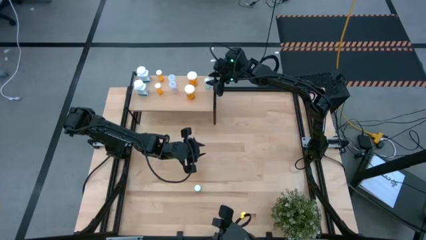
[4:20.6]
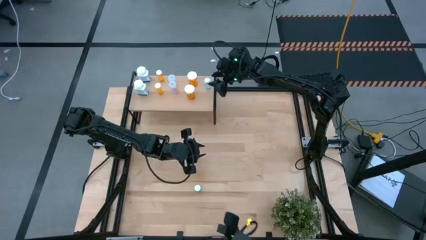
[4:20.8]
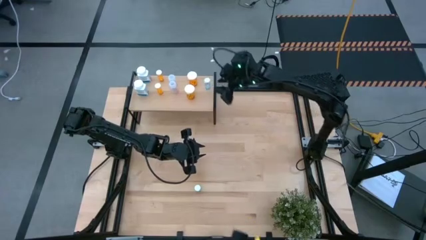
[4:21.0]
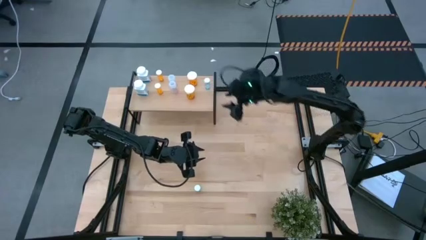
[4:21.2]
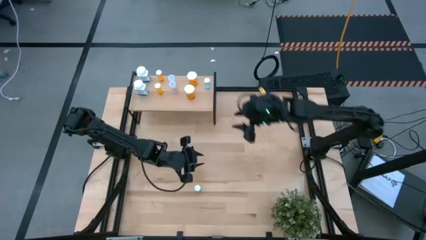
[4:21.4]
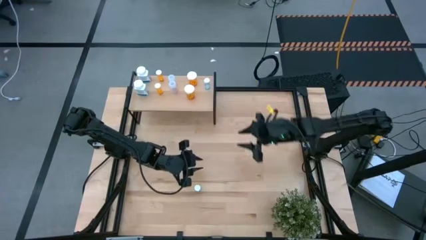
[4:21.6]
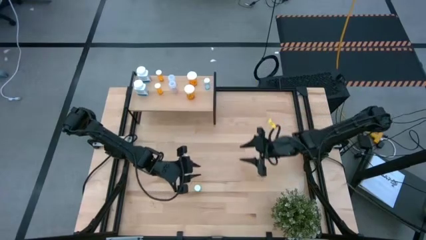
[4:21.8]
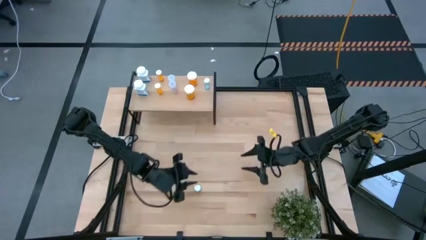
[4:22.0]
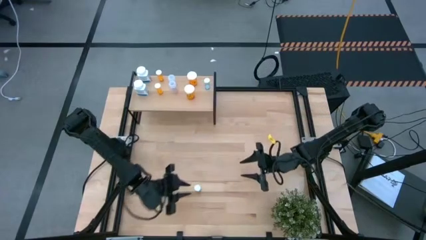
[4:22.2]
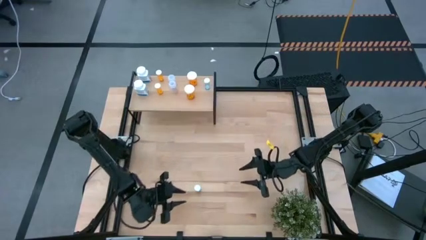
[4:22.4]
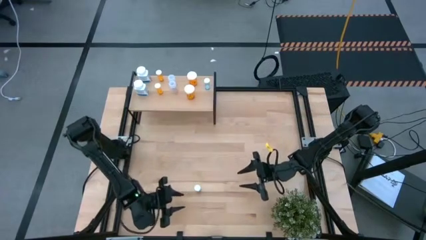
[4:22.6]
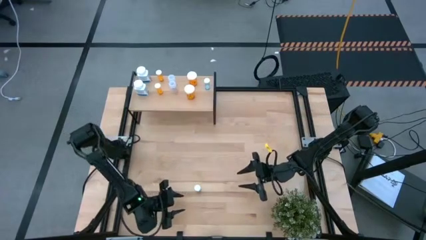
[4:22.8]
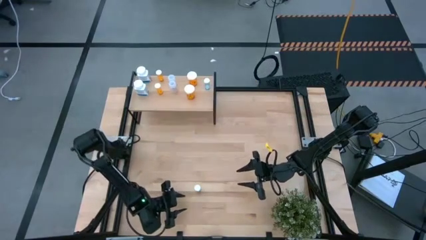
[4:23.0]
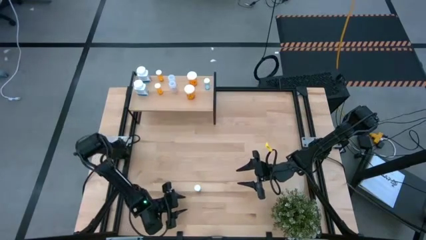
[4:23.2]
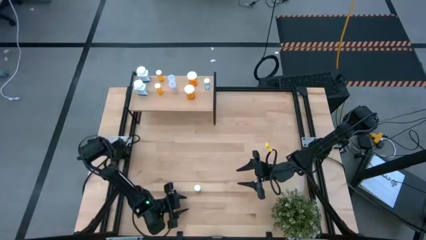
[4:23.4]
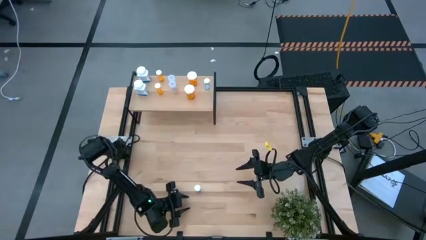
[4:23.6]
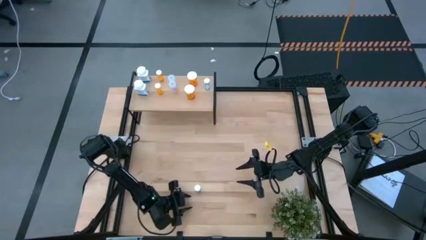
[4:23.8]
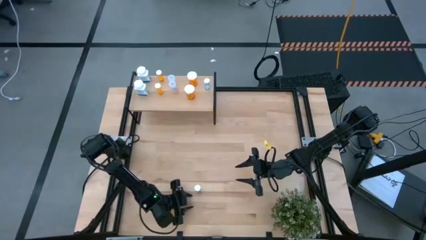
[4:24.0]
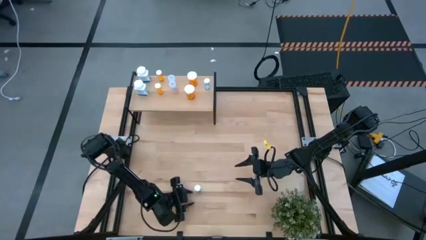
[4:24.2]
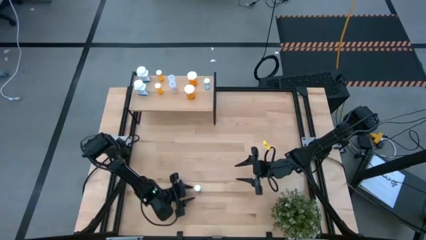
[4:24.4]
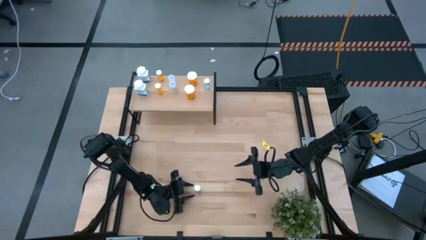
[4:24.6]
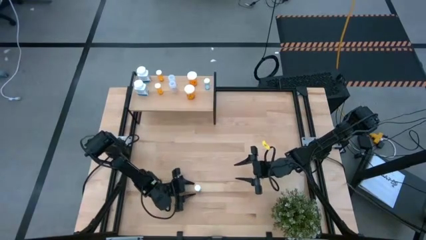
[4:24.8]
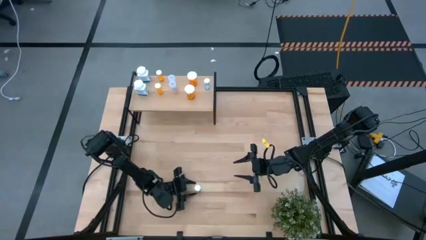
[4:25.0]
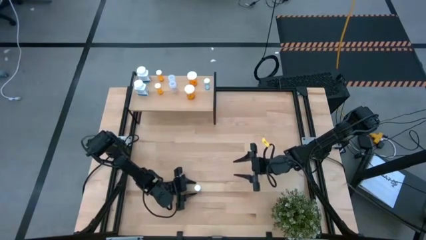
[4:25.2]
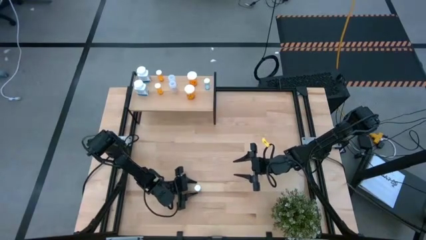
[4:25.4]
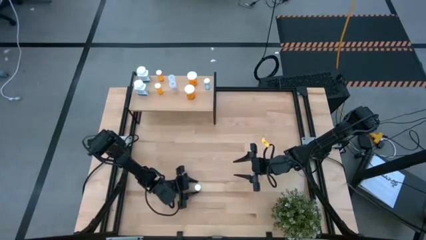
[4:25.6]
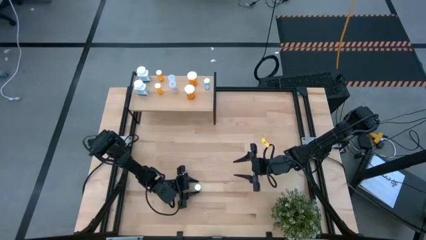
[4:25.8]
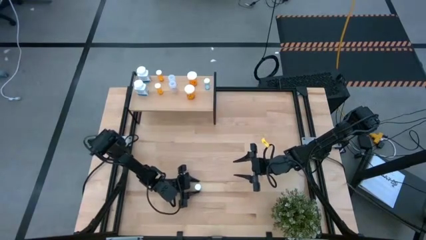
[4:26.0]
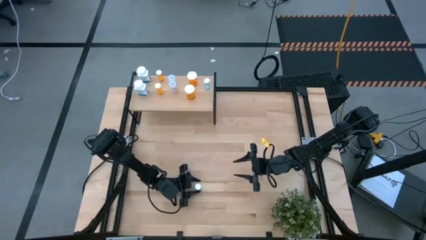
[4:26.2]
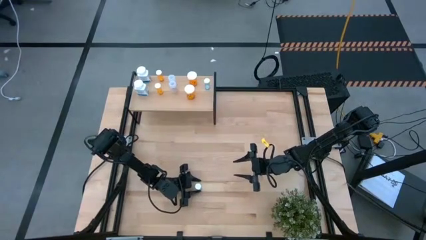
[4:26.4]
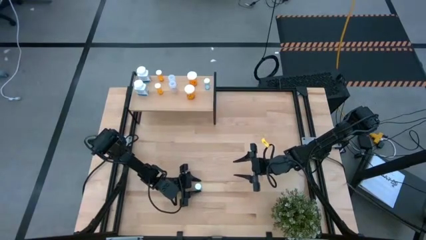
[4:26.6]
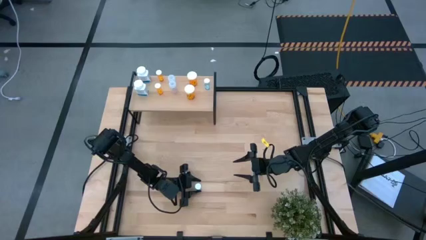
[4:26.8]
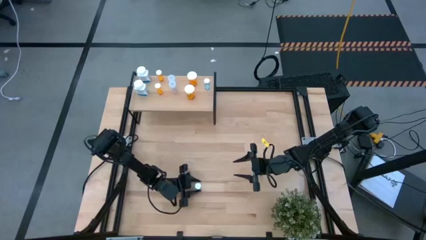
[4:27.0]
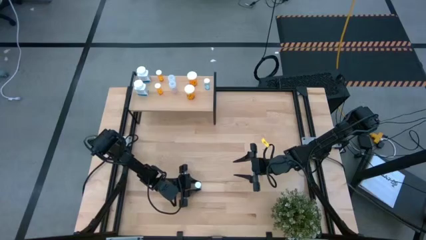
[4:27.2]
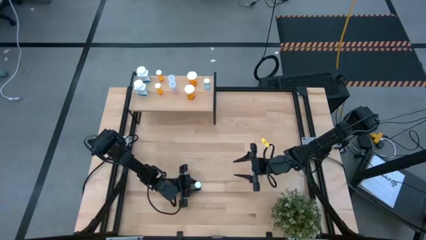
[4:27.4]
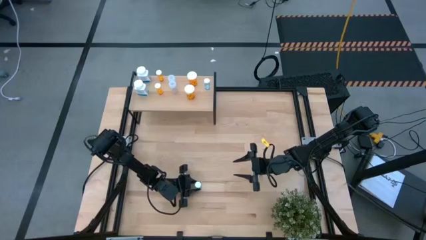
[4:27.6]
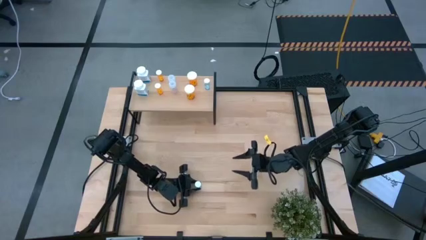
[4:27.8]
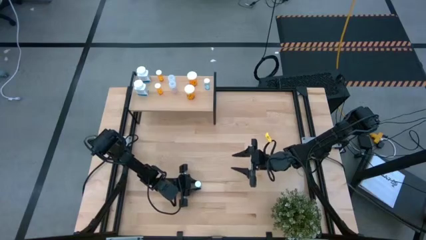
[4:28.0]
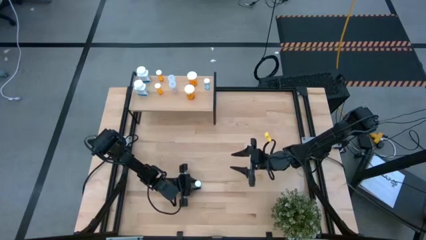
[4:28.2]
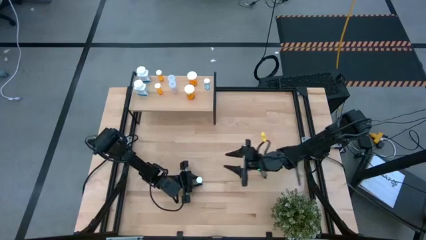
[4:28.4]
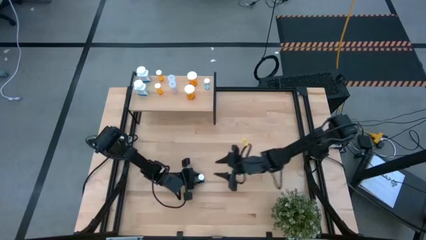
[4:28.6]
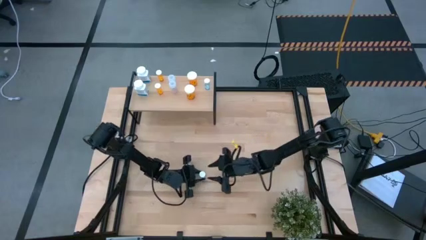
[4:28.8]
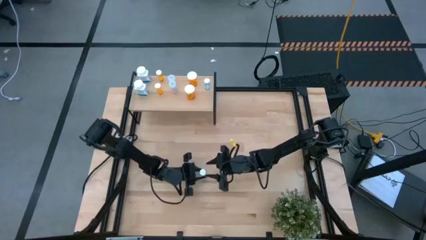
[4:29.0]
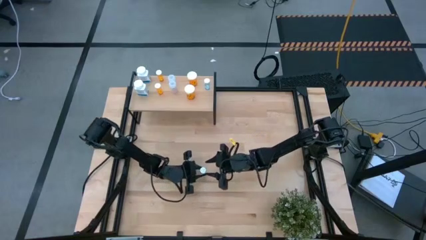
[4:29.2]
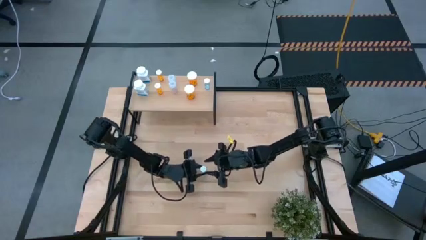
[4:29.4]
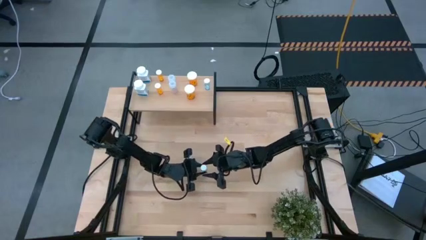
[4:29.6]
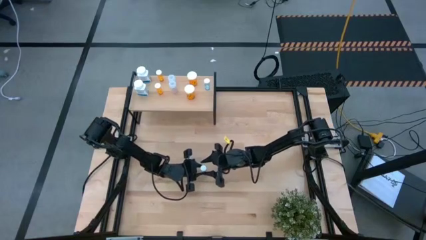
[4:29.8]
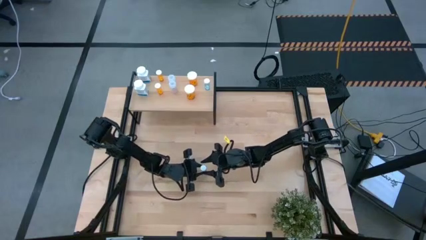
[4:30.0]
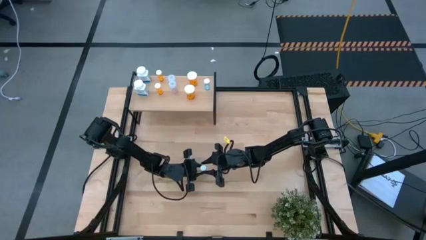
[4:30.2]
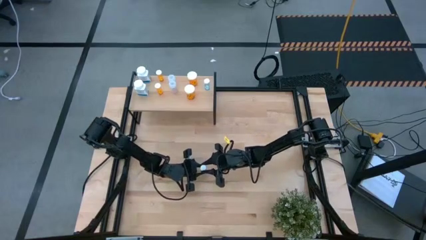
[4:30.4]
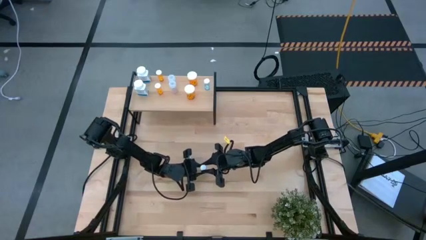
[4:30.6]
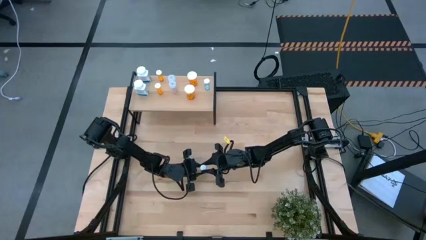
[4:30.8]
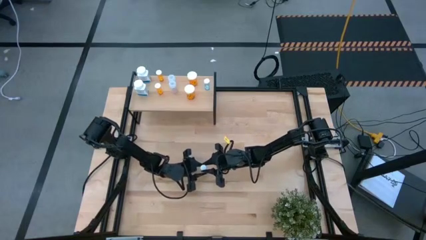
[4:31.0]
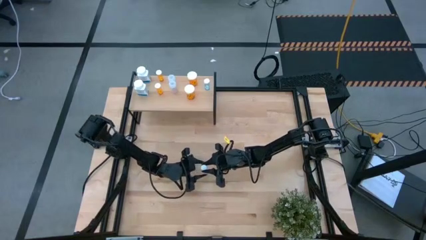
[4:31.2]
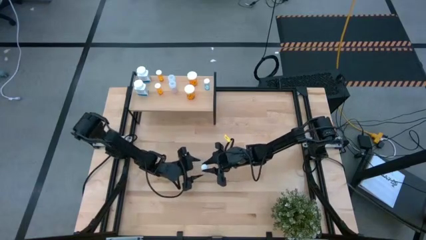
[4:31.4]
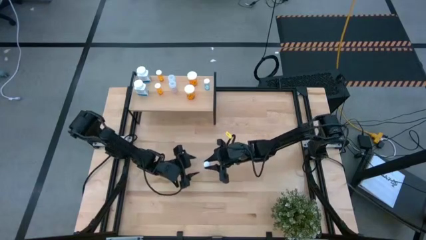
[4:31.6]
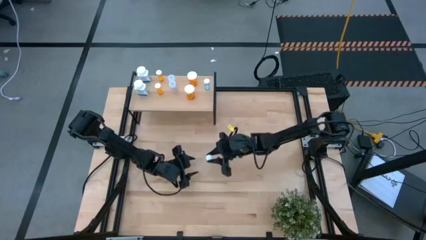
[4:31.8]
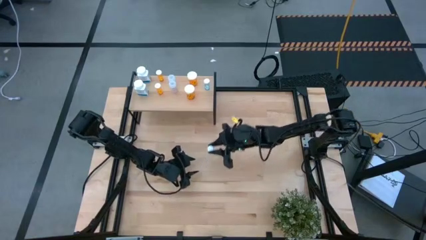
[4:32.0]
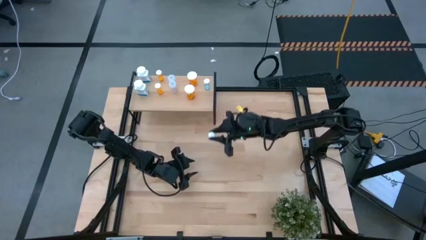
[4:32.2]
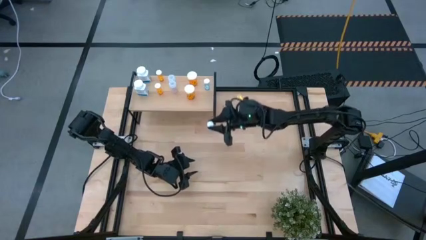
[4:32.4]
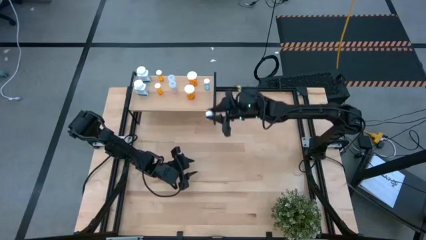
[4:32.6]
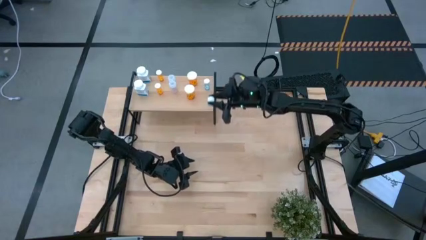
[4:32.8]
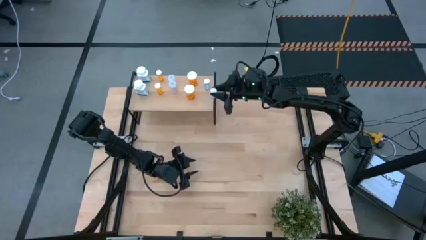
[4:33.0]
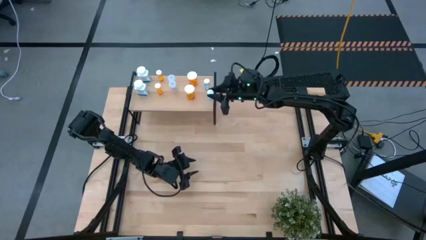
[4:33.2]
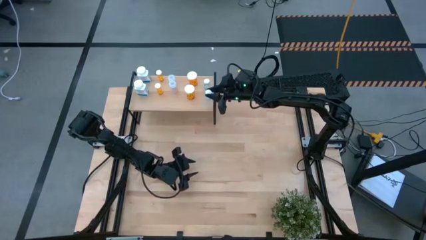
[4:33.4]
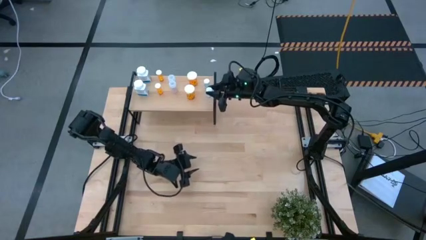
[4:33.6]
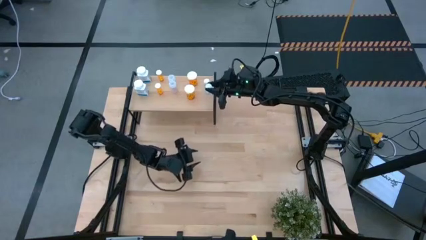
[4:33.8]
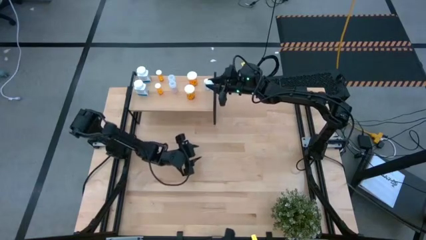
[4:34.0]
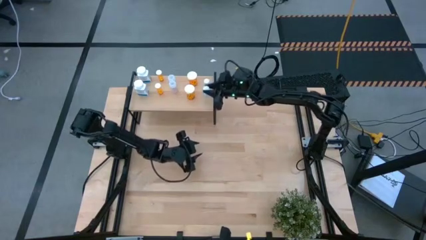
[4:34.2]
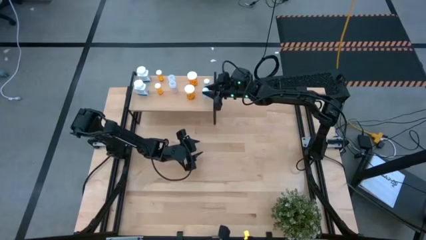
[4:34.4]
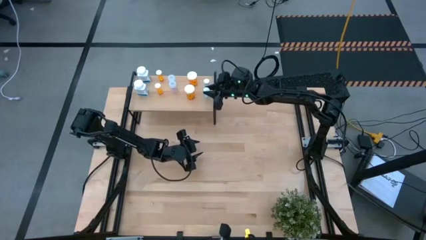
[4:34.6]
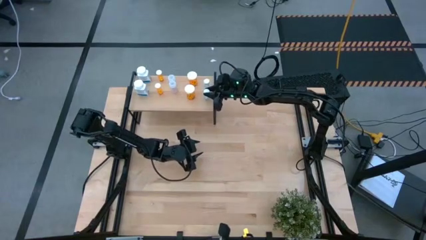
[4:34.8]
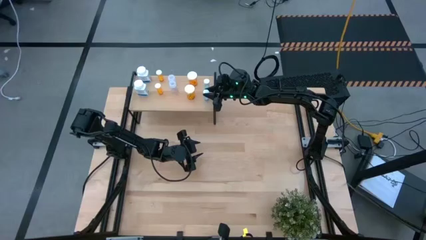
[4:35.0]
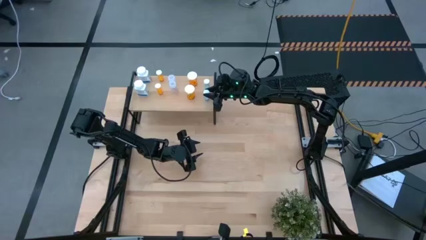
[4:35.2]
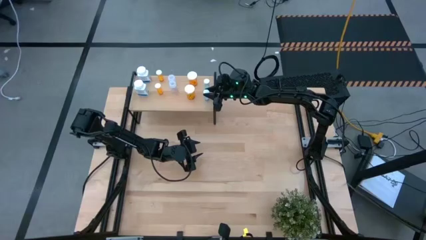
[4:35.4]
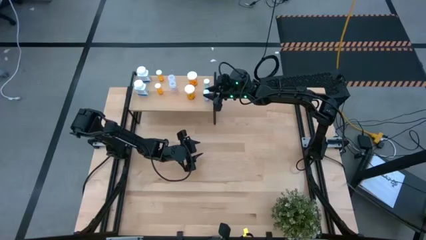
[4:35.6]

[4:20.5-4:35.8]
Task: Pick and place medicine bottles onto shelf by color
Put the blue pill bottle on the shelf aligned with the other blue pill bottle
